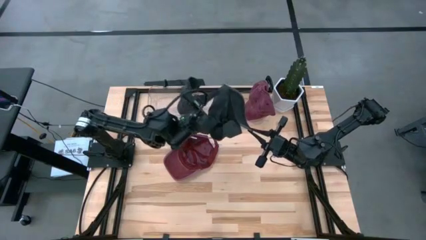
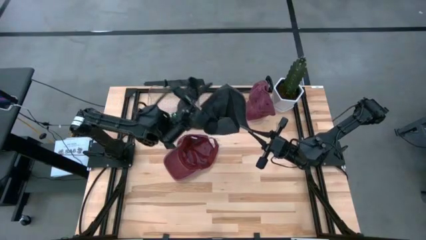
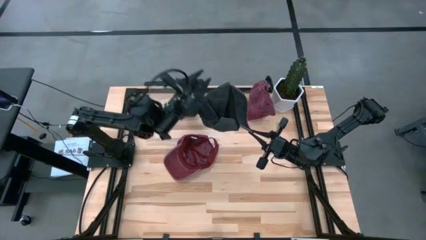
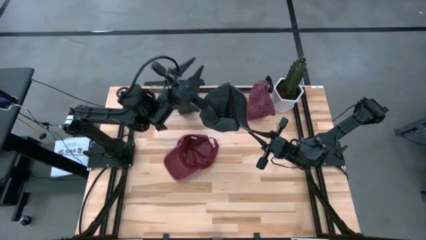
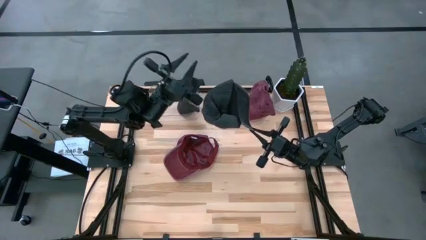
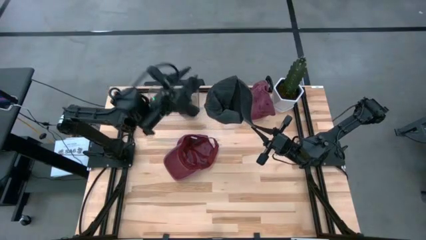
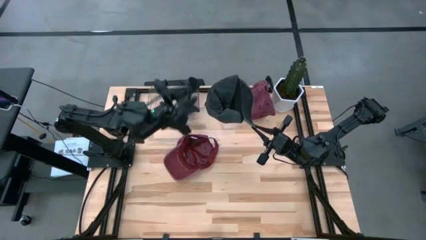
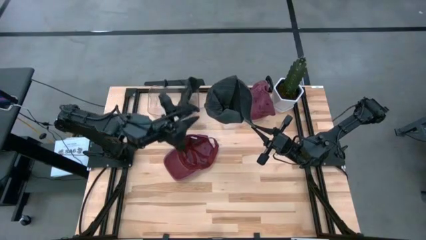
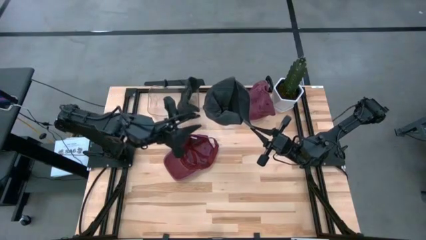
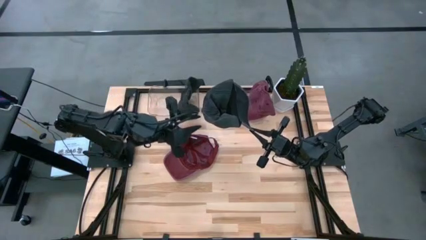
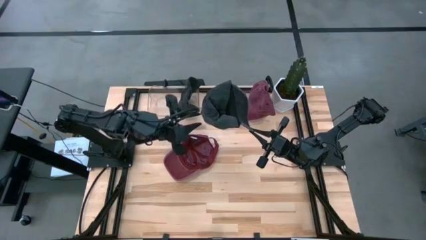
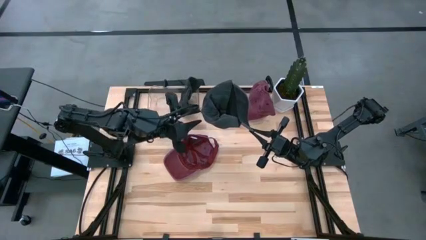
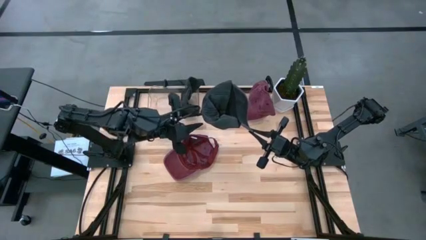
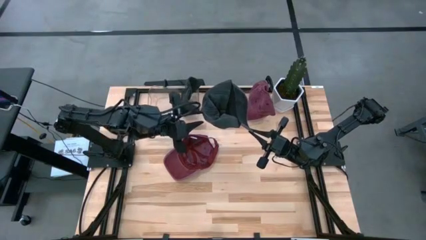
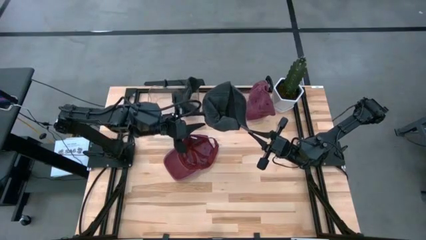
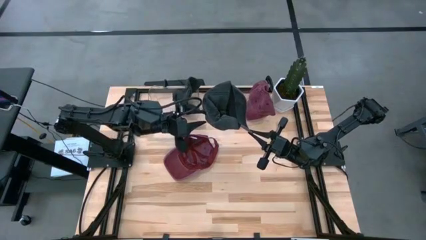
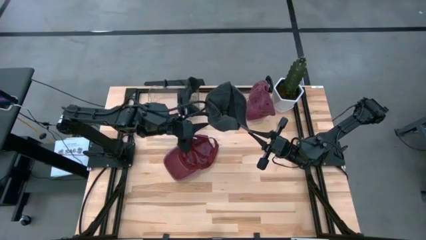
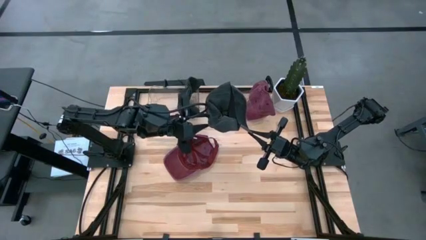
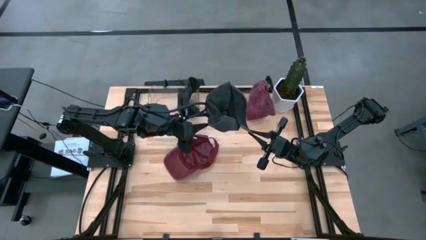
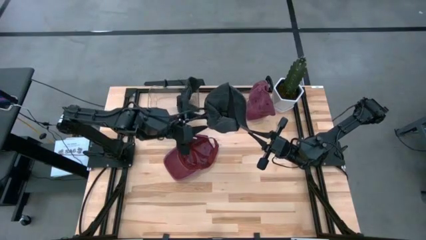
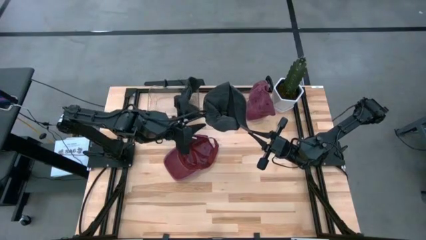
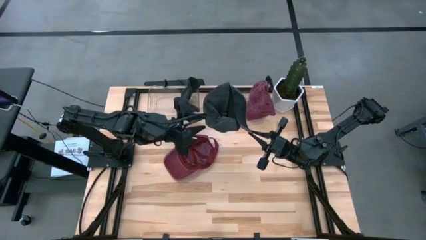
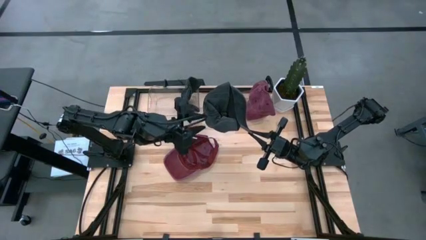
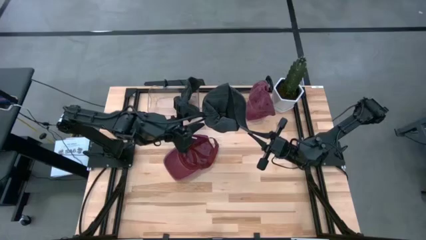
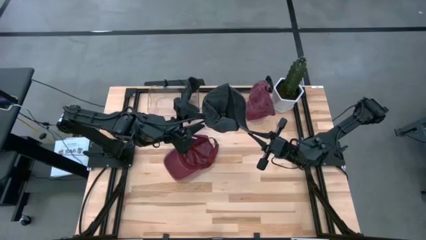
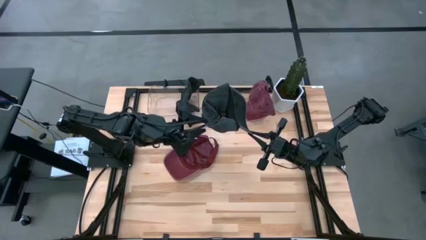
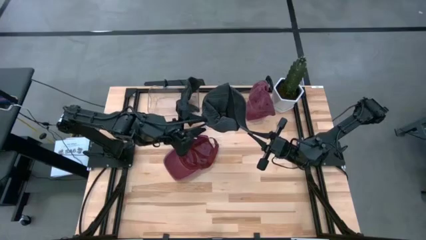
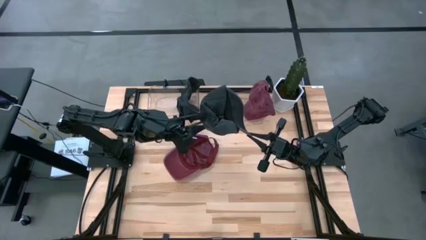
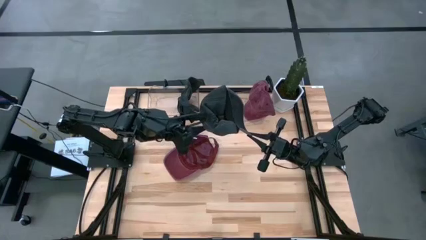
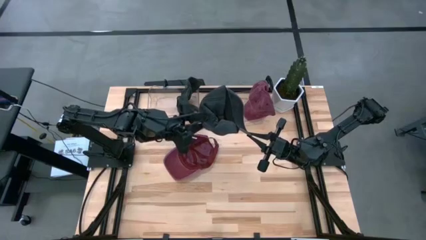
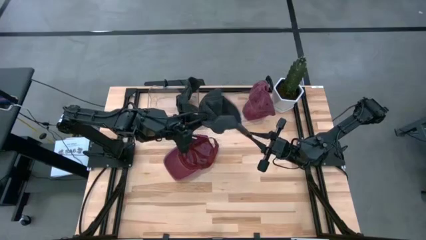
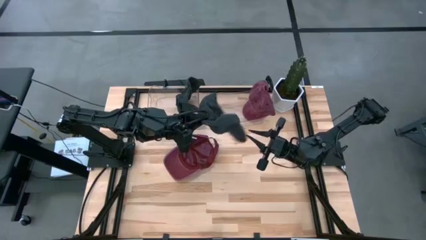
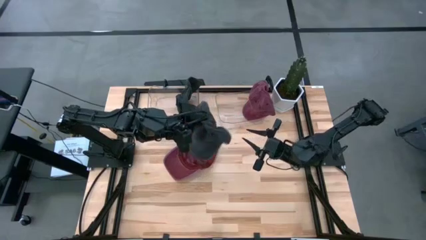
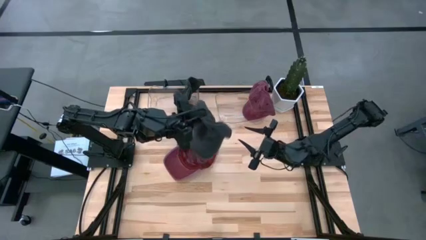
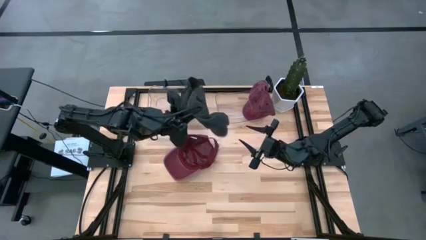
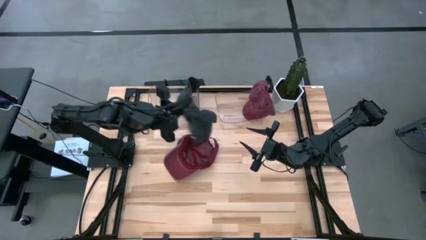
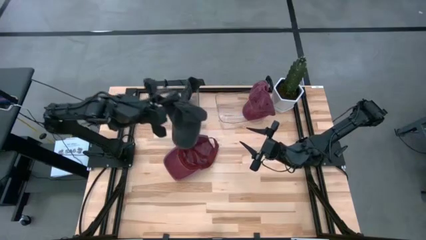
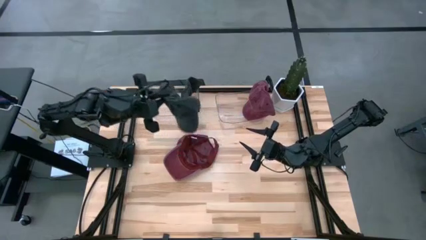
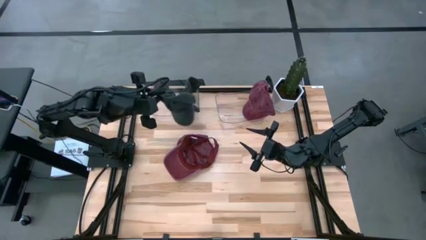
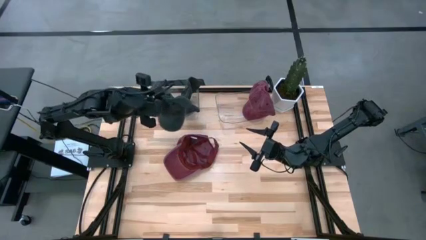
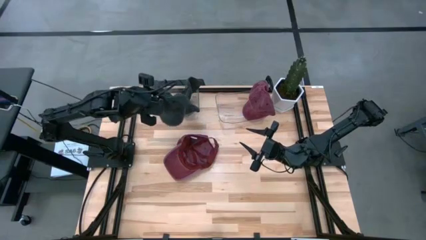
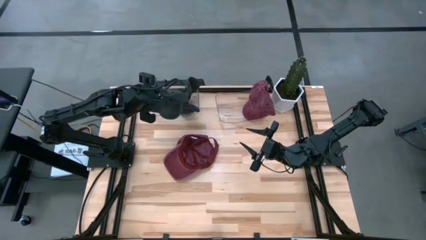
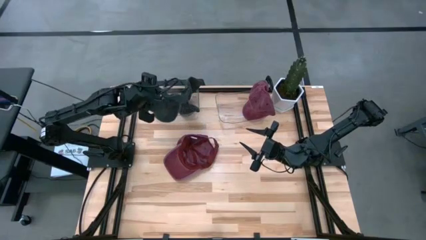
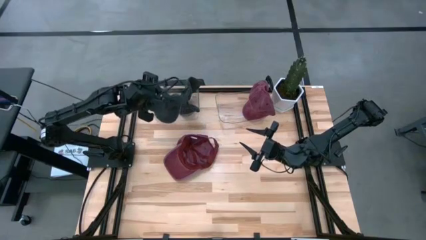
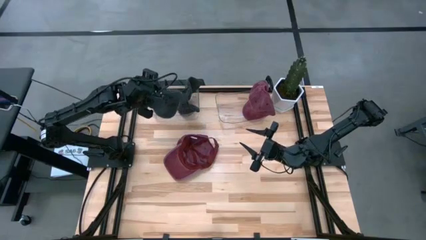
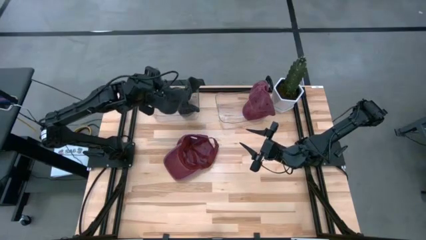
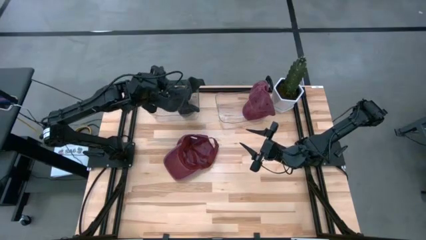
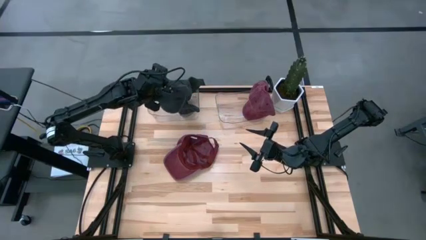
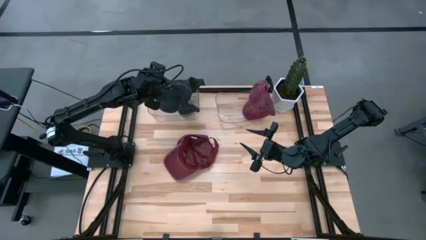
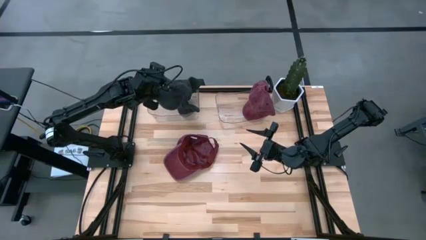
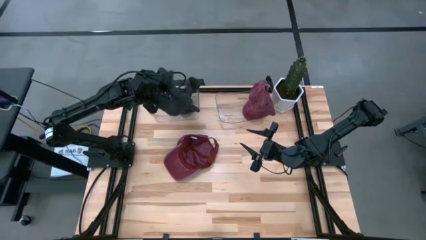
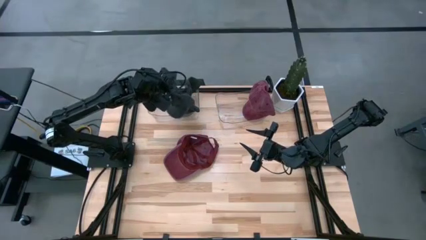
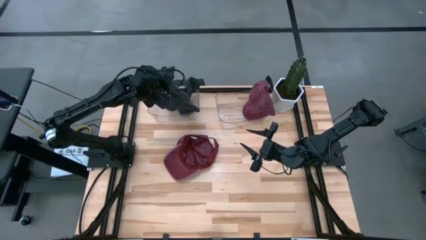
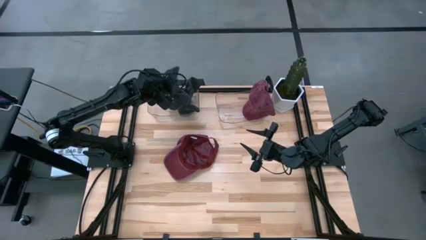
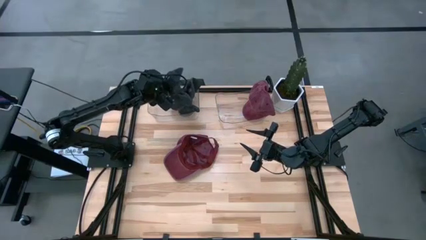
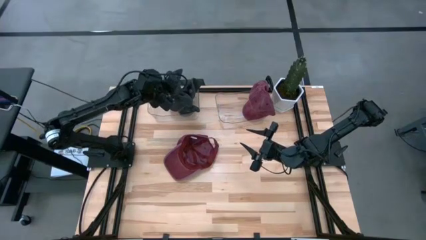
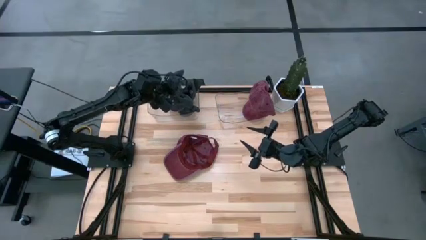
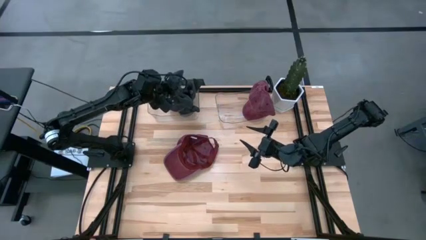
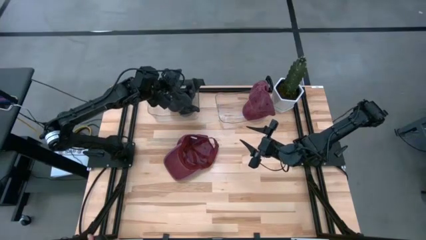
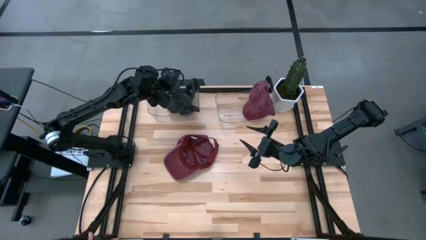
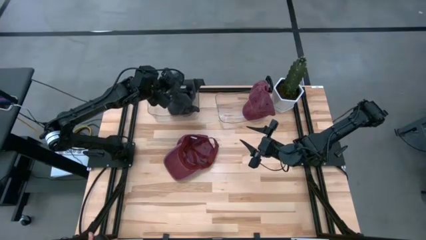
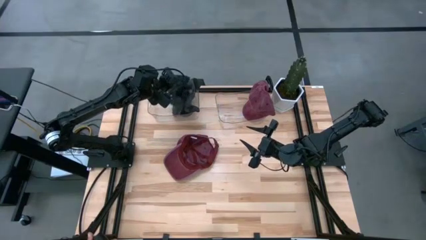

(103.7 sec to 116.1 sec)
Task: Pick & Place hat
Put the black cap into the left transparent bin

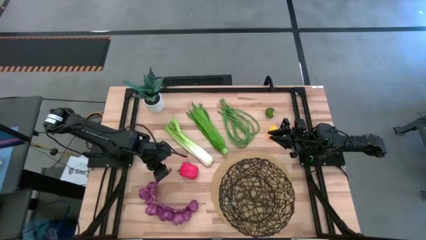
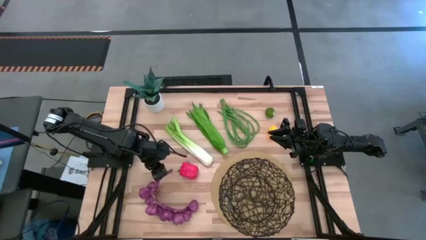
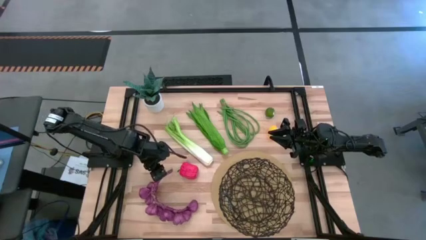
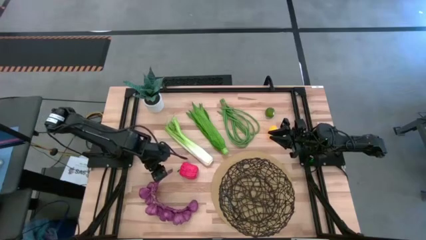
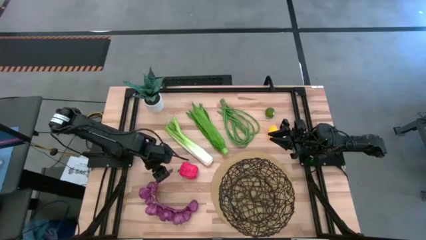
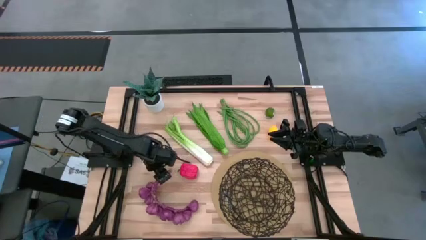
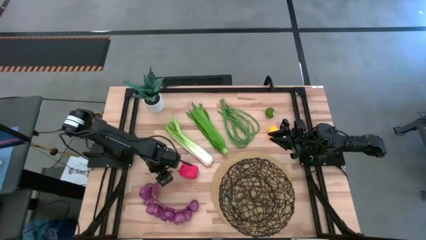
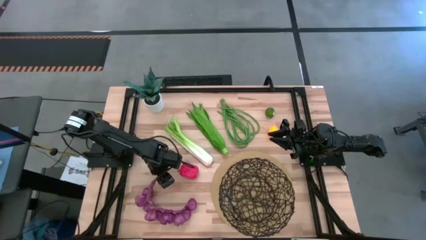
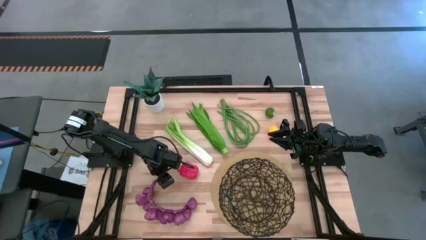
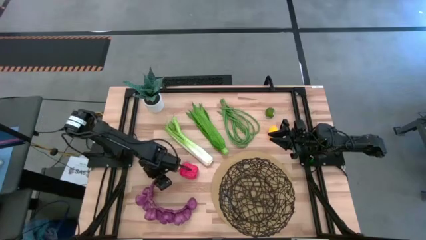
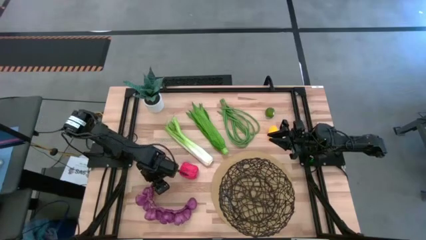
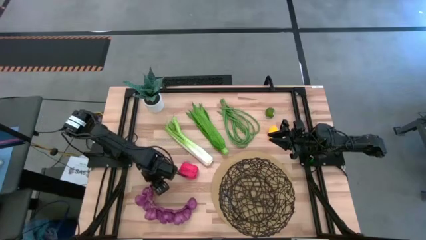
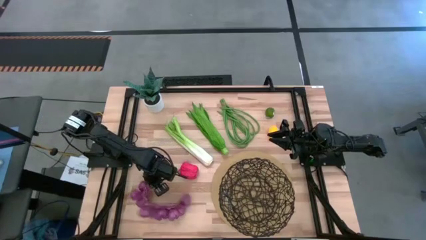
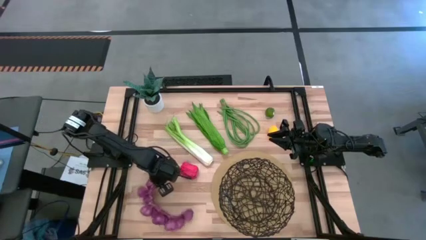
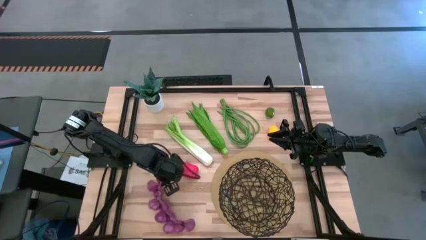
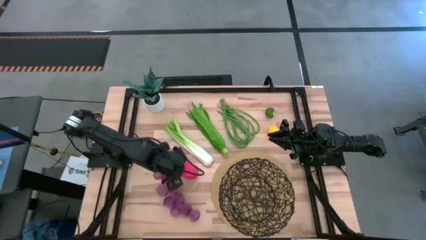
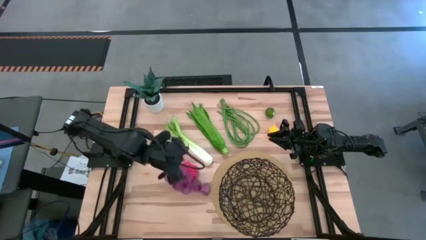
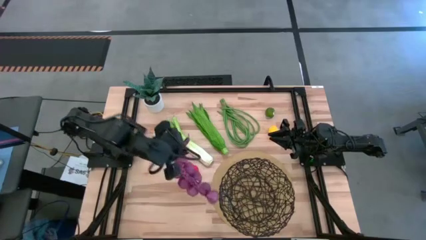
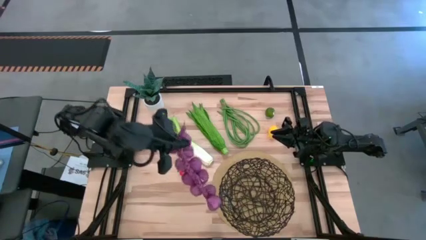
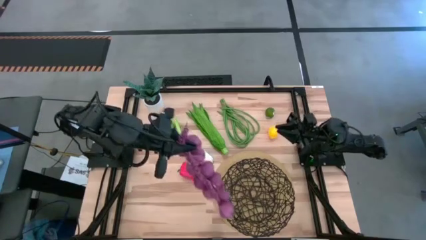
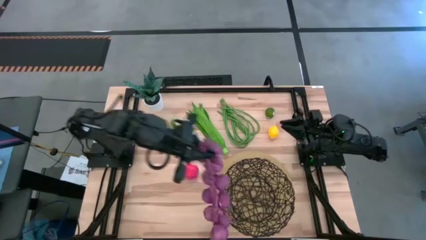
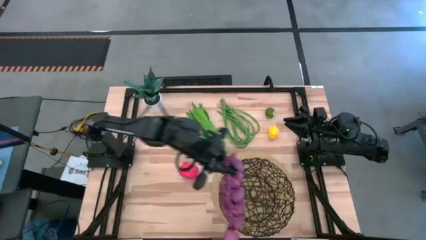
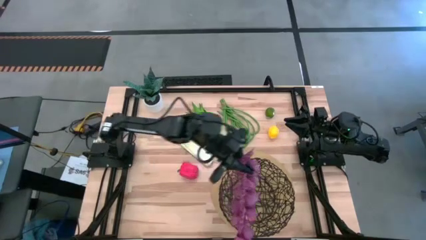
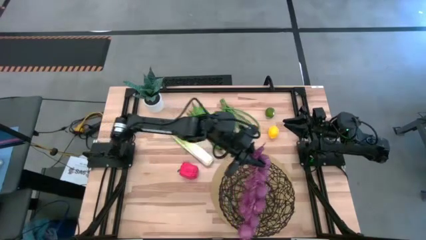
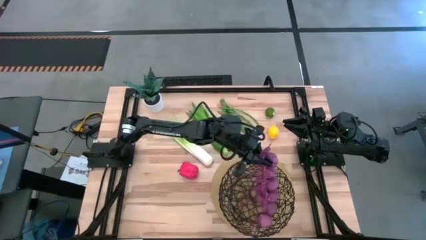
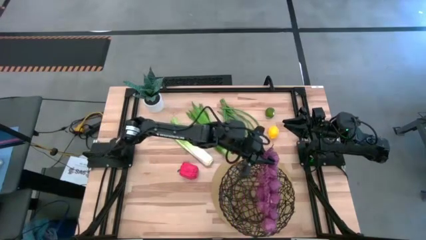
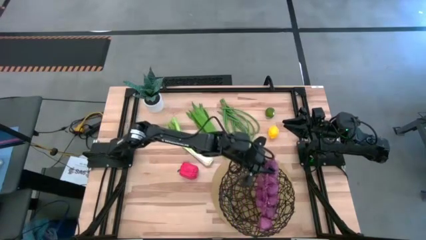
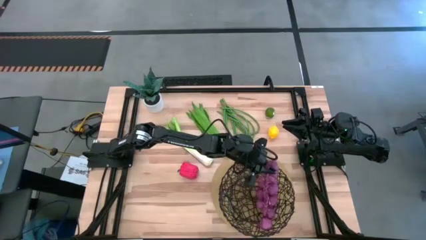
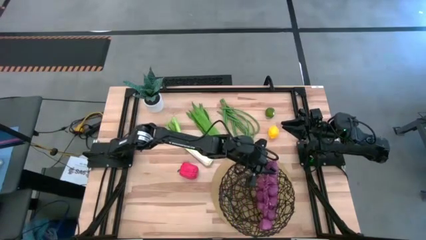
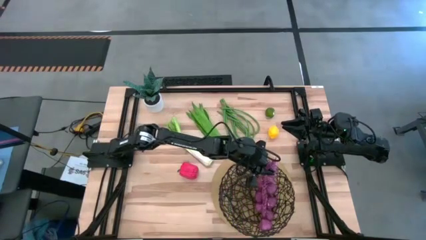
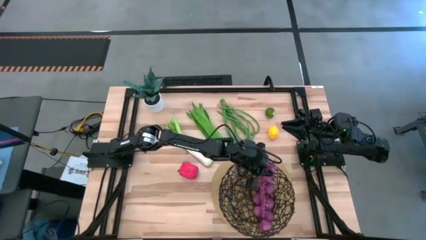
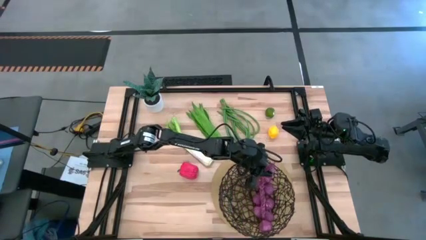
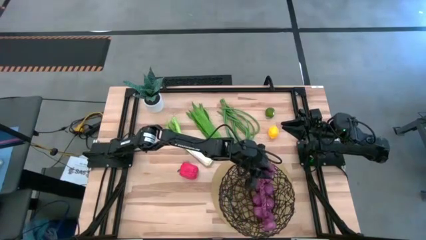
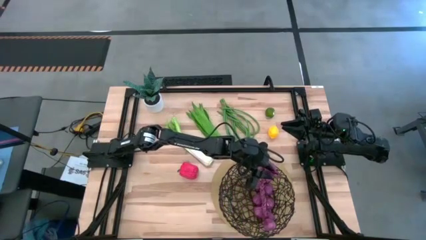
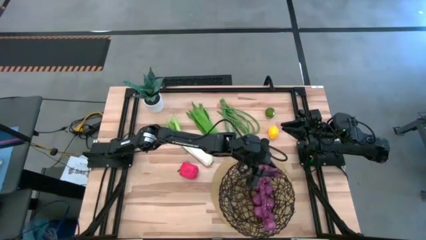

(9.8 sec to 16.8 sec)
Task: Build produce basket
Put the purple garlic into the black basket
